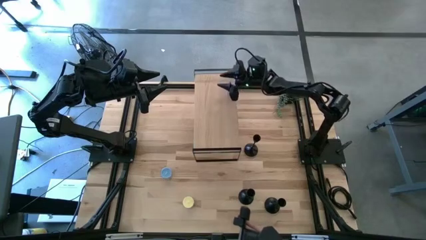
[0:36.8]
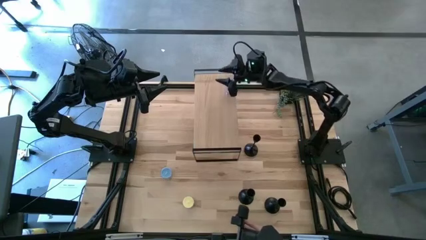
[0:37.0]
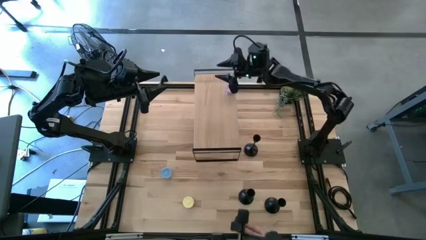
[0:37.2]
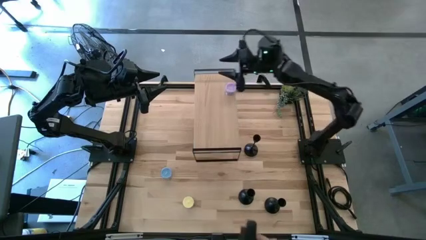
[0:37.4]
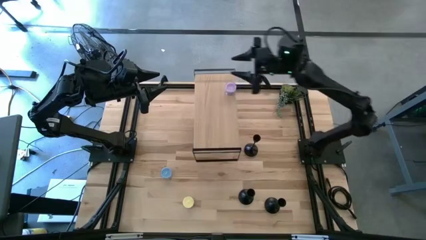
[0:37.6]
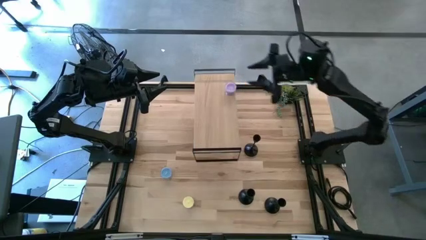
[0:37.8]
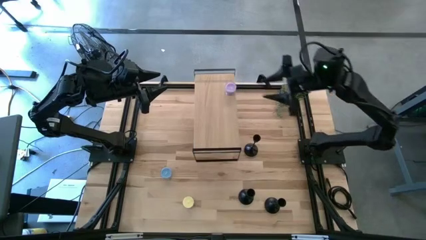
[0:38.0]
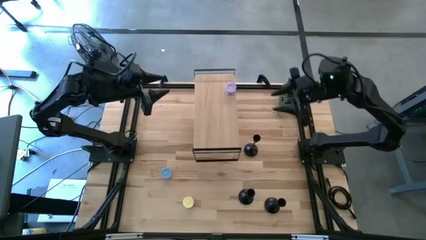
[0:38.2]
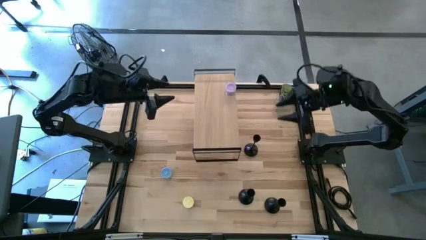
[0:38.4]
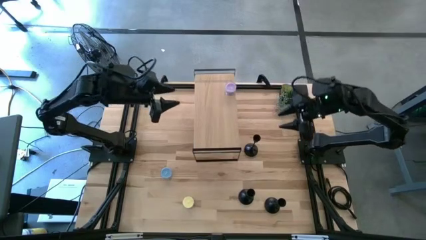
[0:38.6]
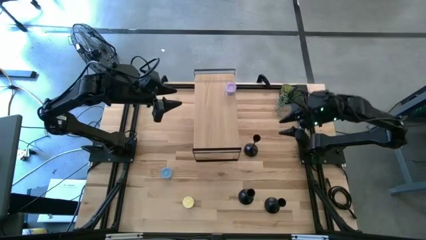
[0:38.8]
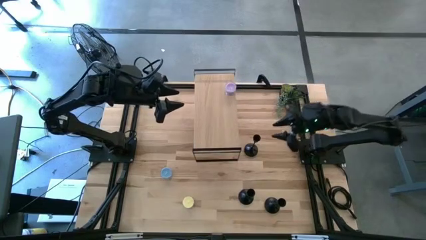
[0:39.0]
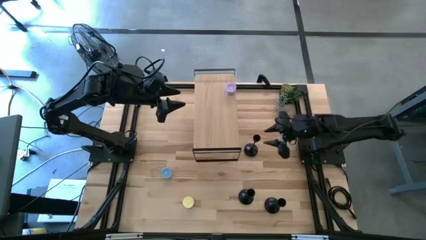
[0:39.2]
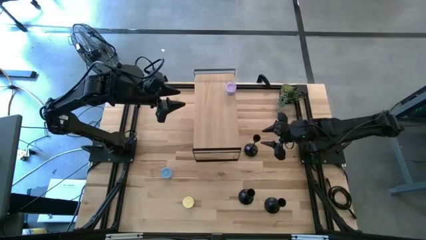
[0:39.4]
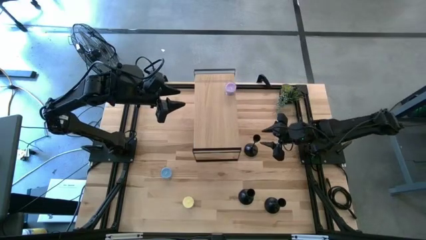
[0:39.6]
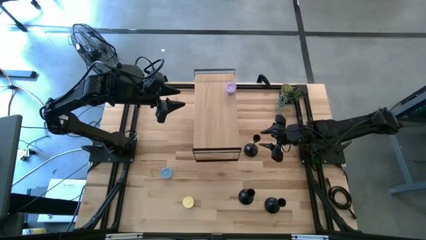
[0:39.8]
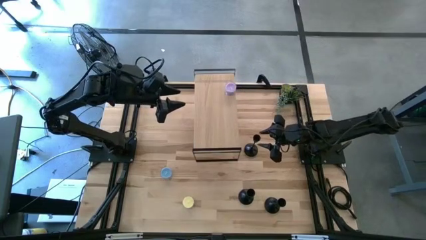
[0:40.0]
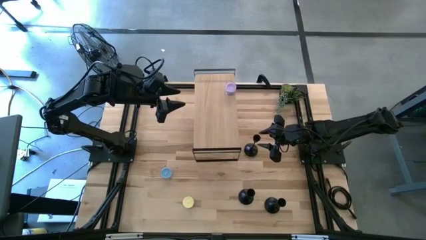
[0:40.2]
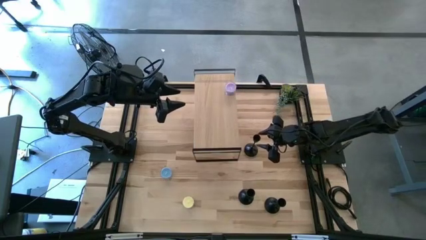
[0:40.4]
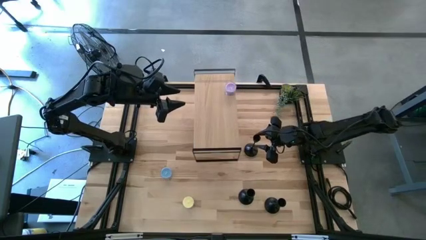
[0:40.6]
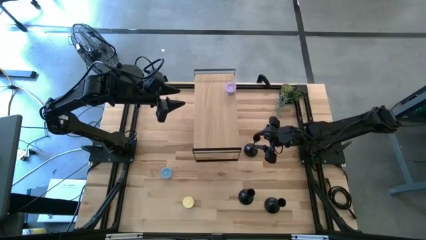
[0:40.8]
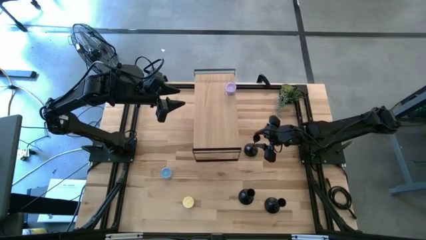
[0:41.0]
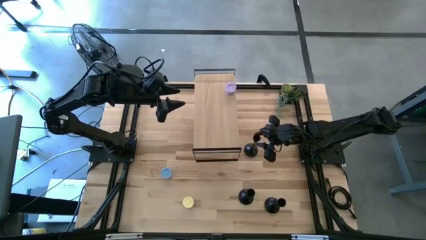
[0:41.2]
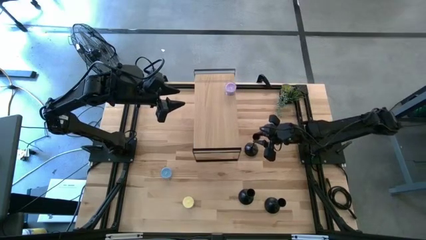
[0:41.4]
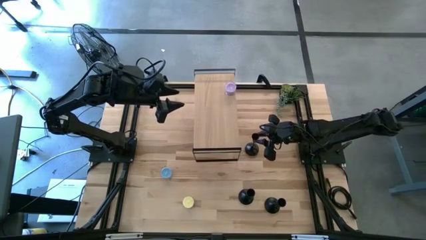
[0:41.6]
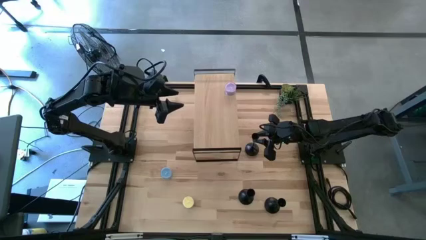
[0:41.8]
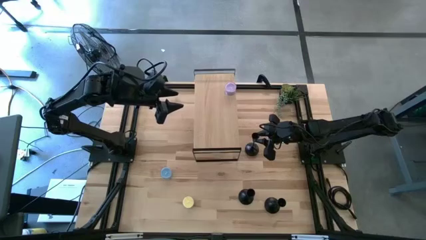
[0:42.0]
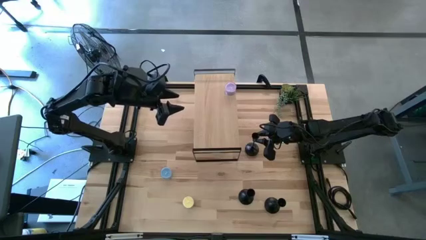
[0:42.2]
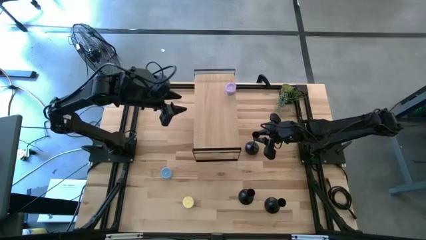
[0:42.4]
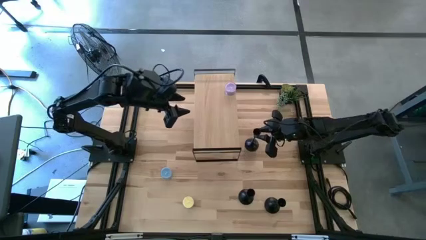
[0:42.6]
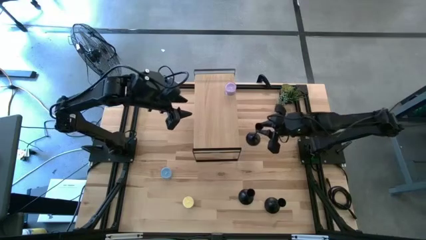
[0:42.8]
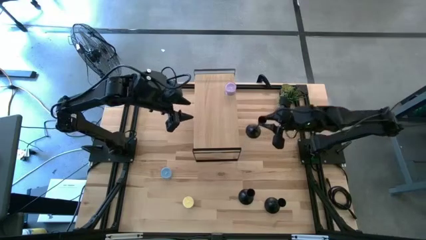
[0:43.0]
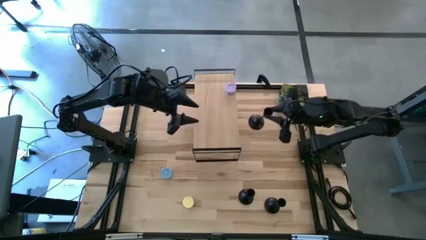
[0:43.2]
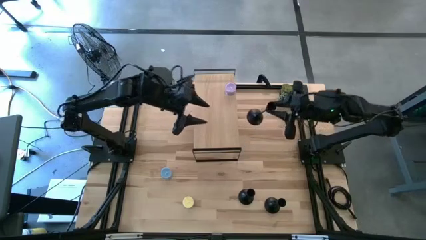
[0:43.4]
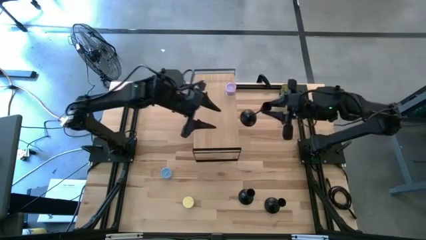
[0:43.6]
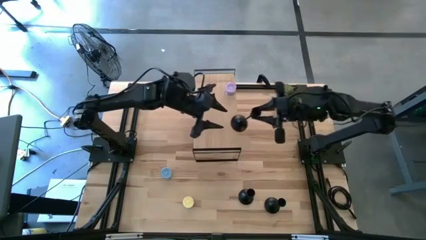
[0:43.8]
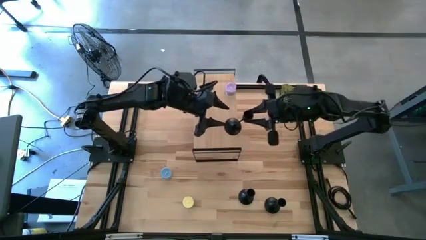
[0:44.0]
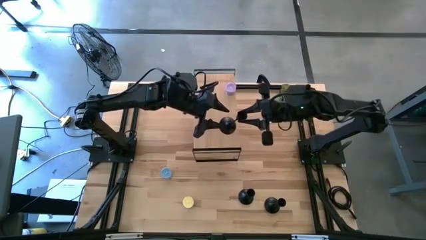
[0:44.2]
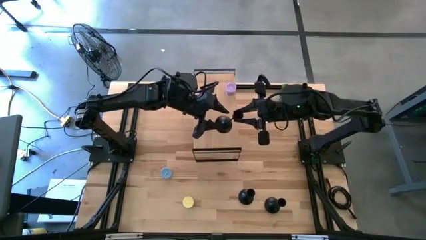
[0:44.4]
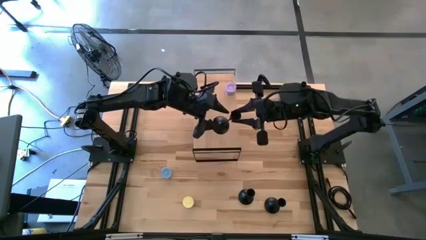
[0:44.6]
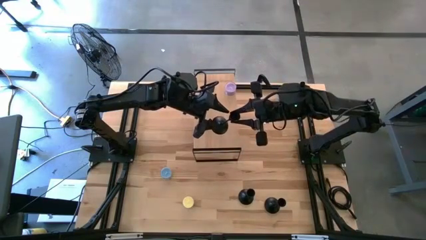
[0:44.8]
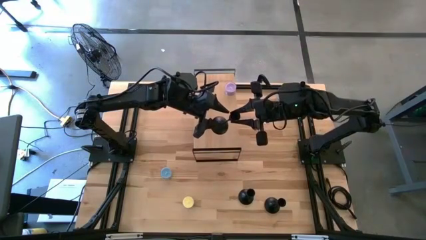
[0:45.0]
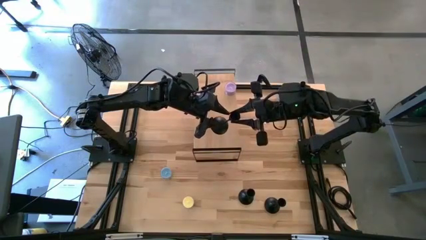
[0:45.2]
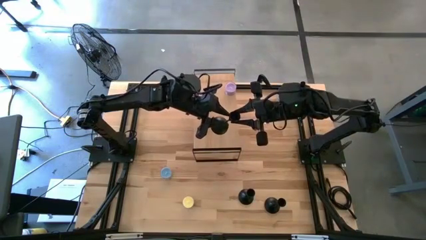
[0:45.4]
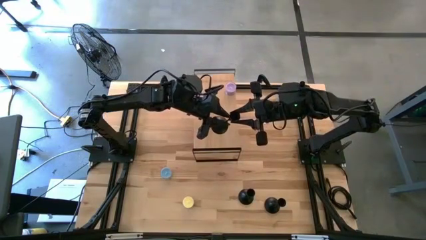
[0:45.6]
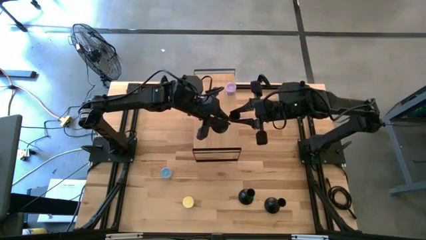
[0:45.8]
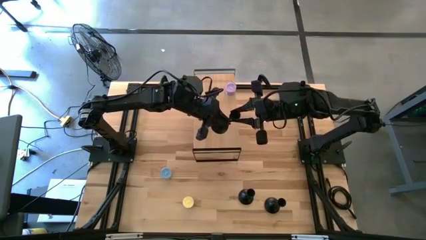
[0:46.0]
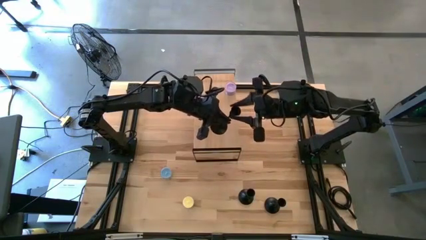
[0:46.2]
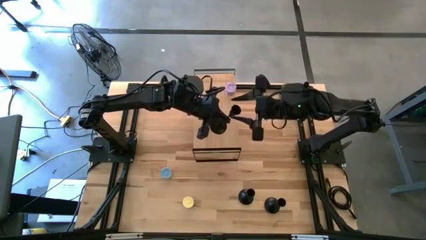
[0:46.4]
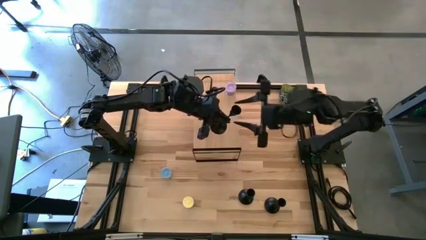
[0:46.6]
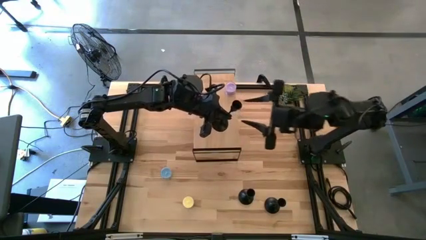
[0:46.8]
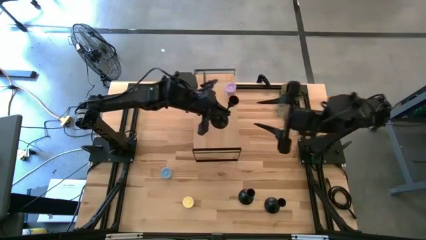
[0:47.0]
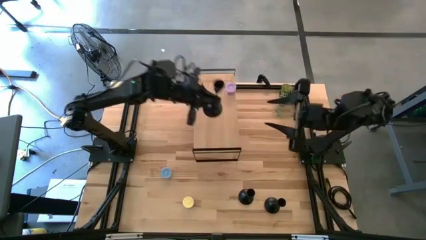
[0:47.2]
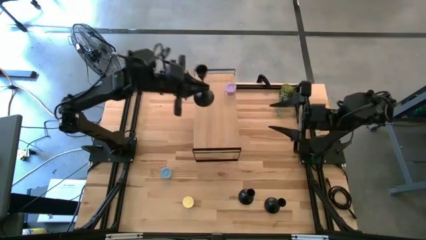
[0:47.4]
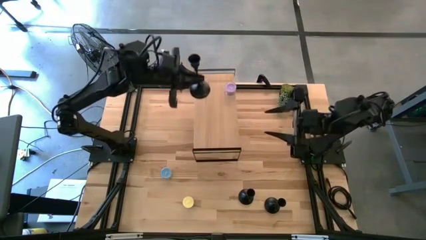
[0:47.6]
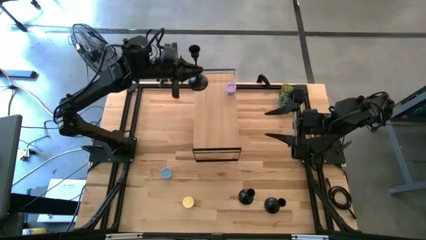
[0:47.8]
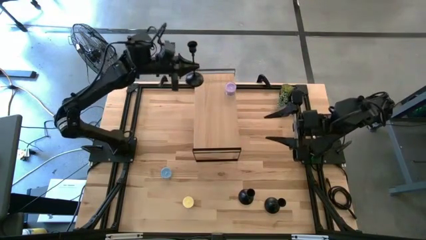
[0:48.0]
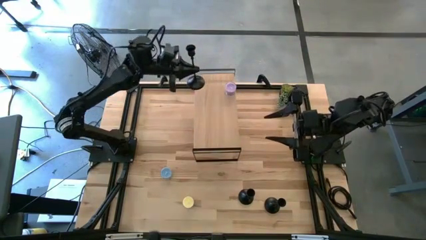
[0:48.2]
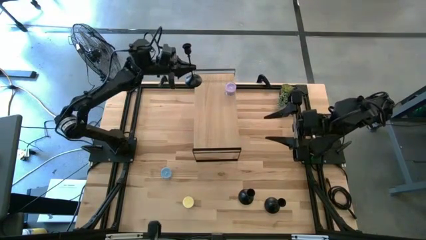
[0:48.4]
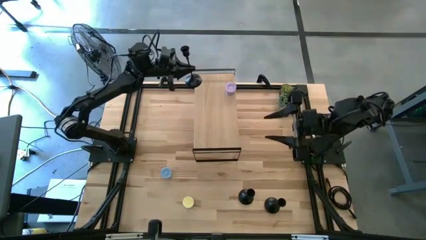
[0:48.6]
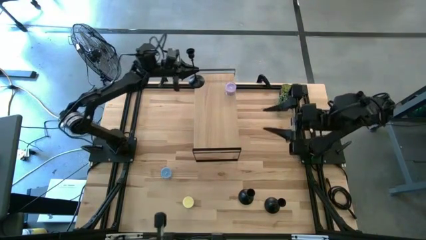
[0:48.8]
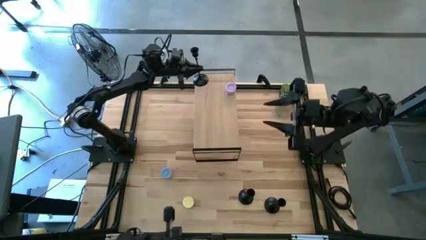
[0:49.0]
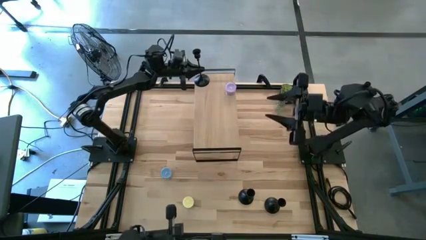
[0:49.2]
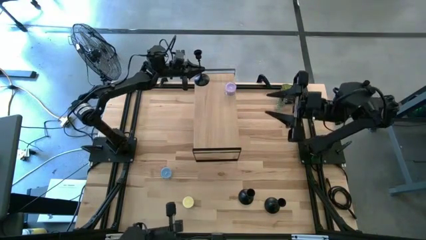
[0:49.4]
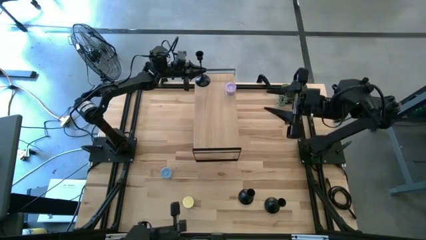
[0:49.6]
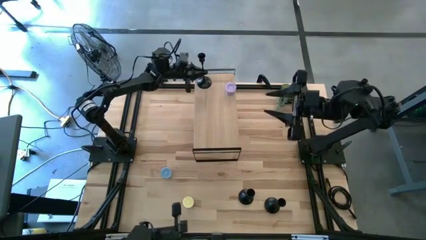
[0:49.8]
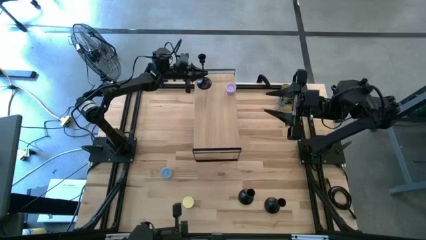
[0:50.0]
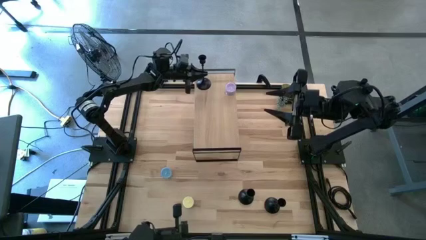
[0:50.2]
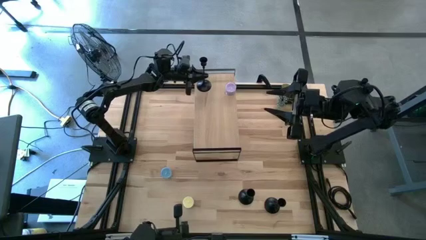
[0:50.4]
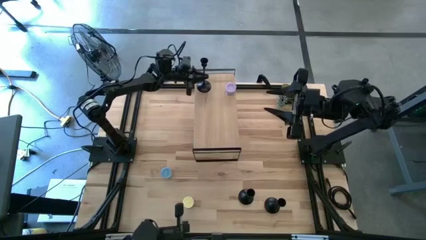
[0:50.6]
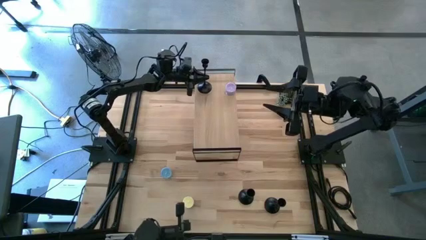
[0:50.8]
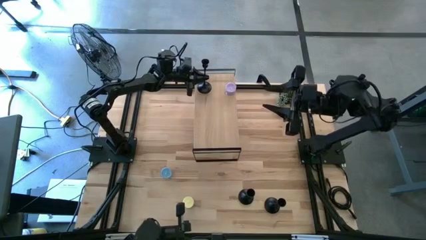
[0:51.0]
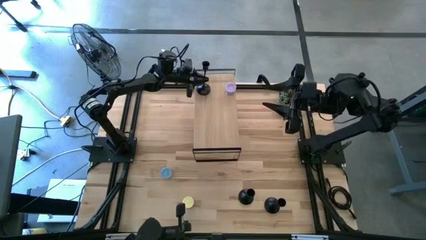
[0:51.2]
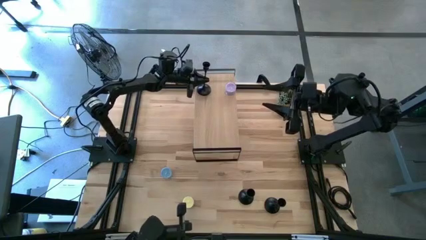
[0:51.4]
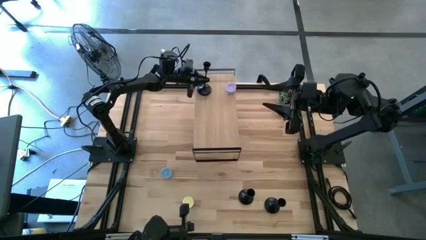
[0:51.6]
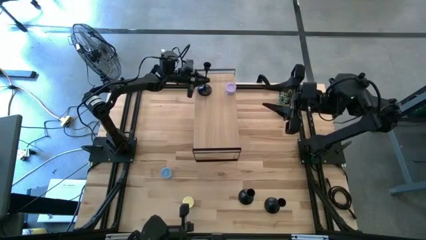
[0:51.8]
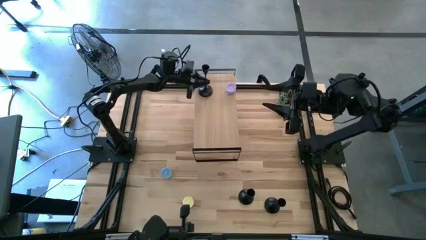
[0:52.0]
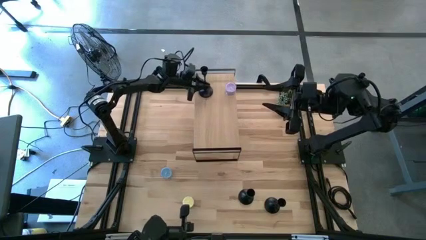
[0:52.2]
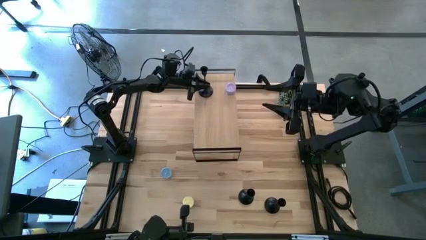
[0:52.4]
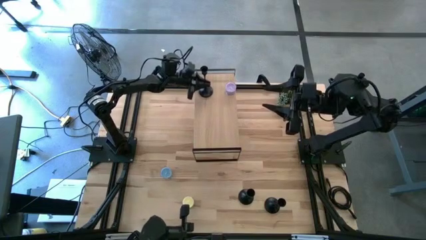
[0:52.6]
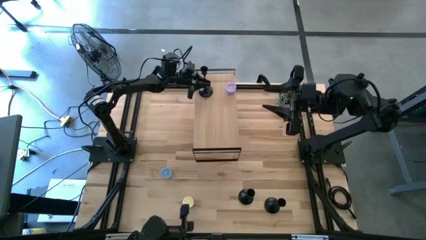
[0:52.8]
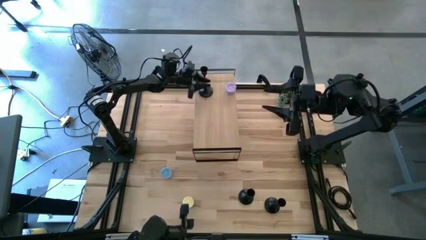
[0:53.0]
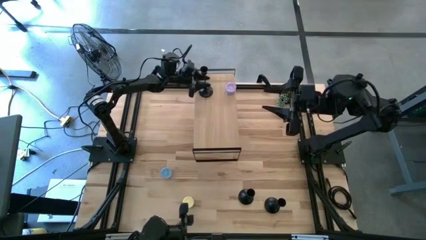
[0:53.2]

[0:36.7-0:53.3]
Task: Pick & Place candle stick holders
Put the top black candle holder on the shelf
